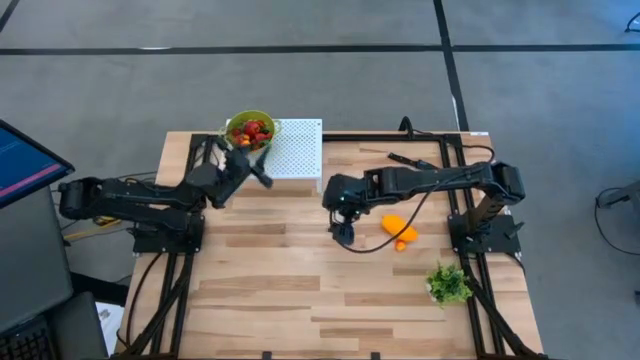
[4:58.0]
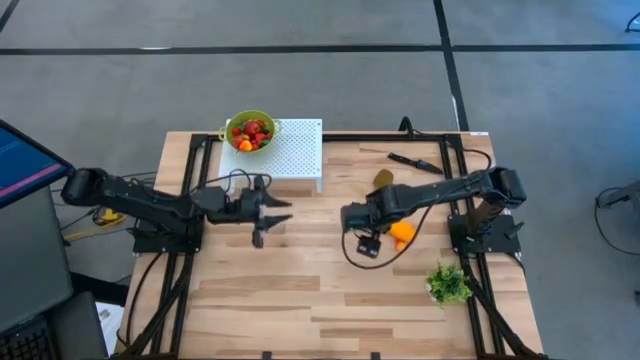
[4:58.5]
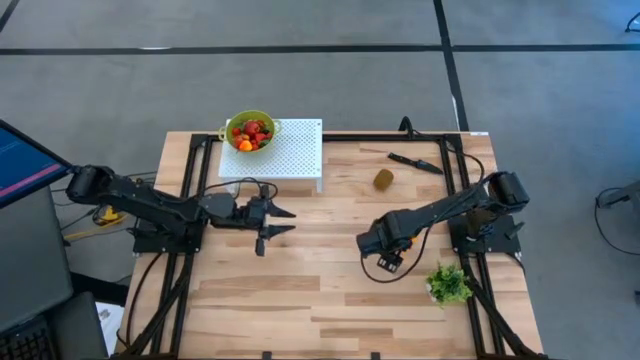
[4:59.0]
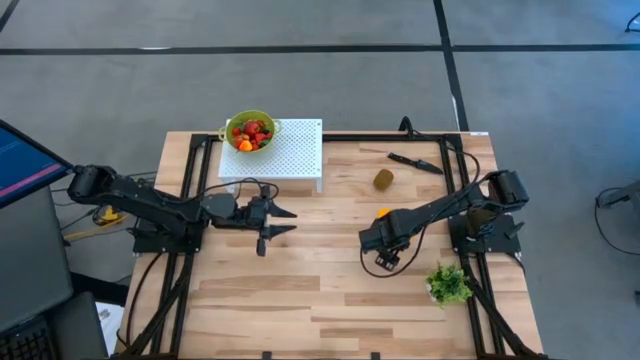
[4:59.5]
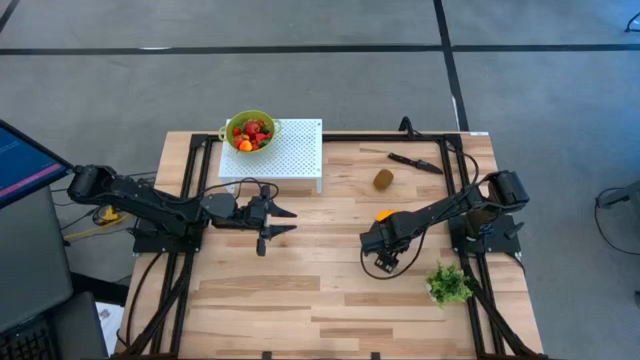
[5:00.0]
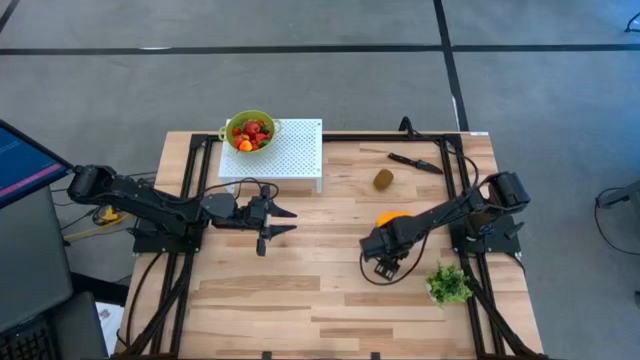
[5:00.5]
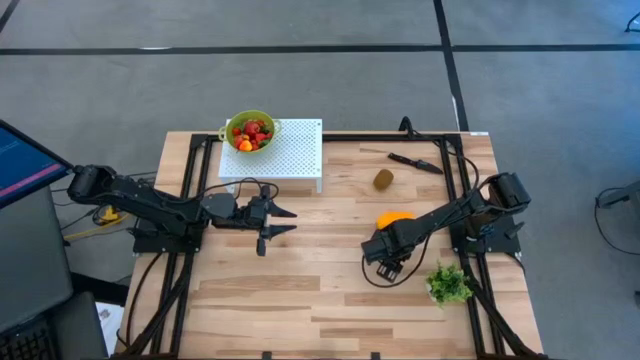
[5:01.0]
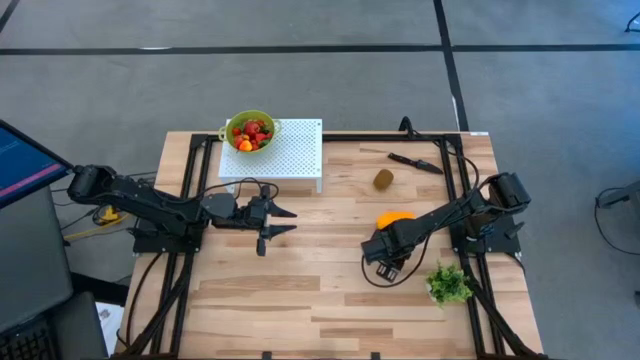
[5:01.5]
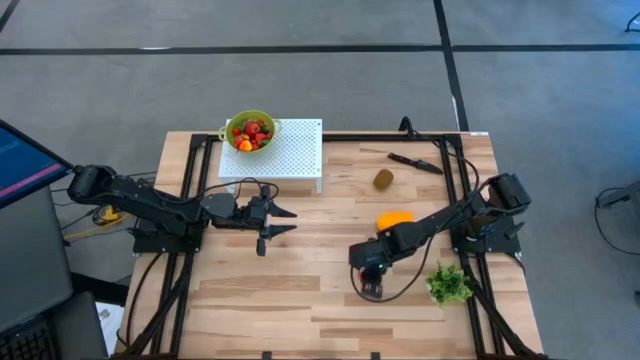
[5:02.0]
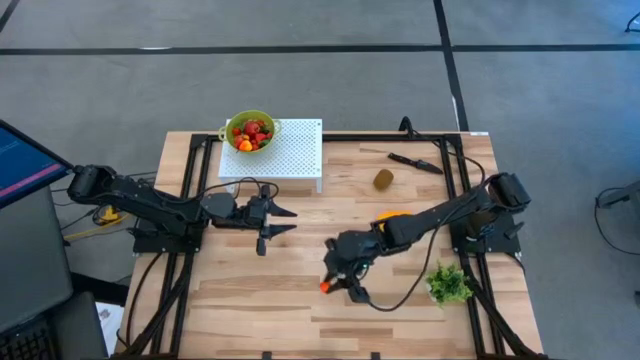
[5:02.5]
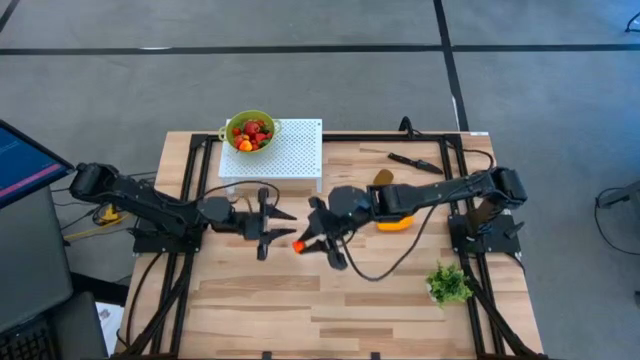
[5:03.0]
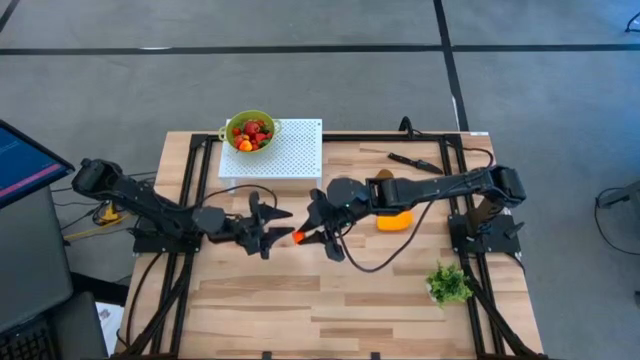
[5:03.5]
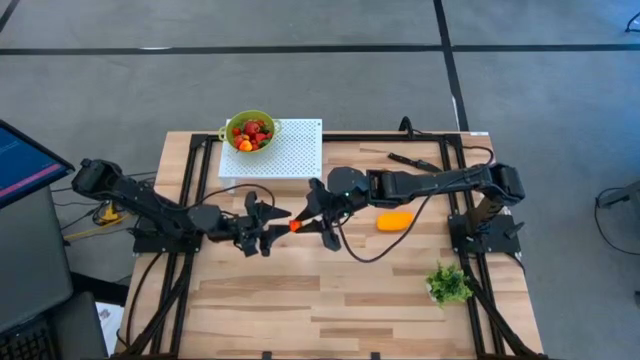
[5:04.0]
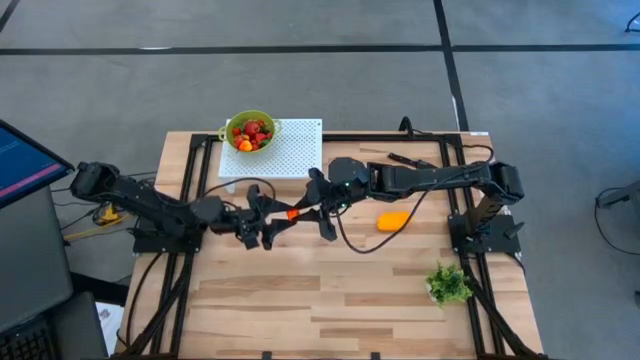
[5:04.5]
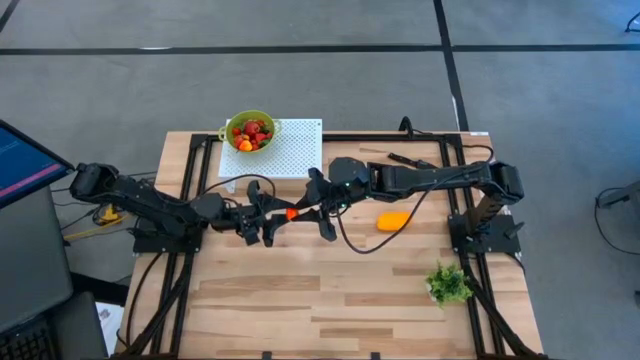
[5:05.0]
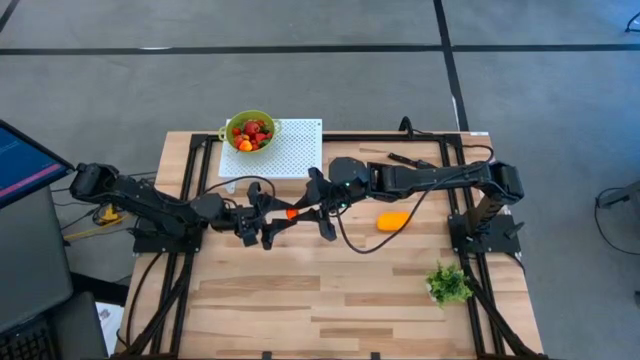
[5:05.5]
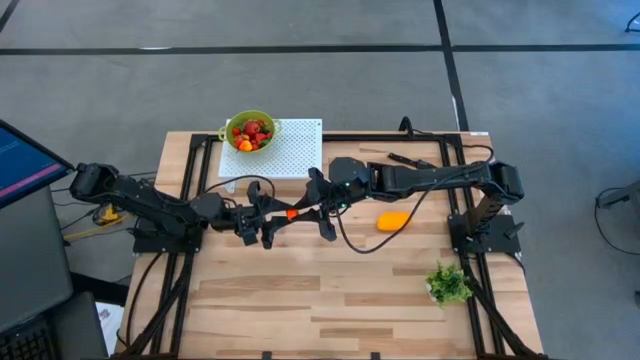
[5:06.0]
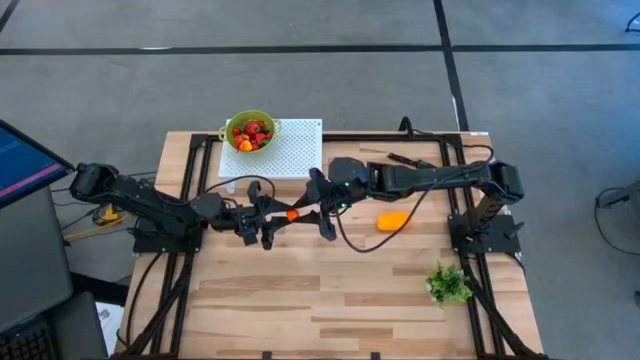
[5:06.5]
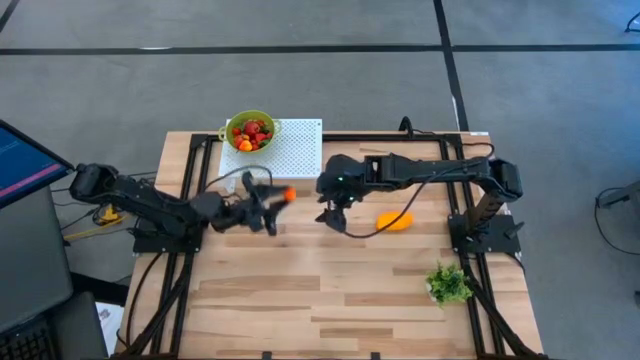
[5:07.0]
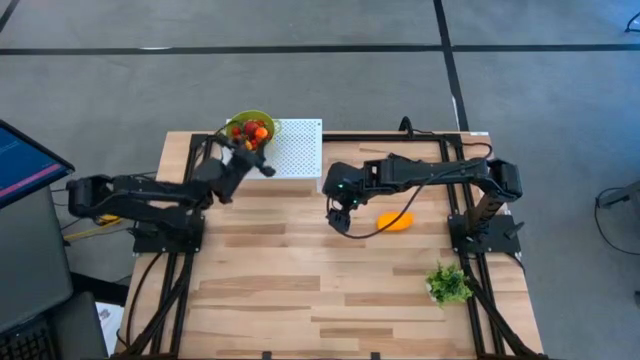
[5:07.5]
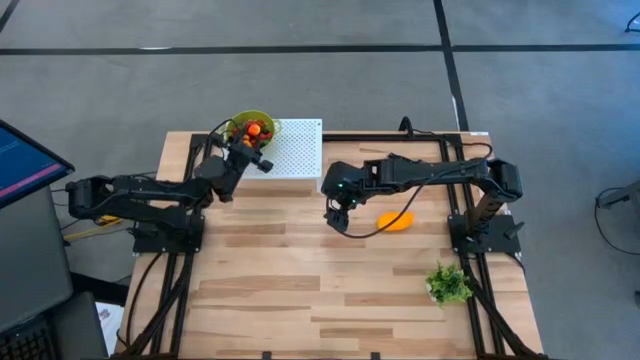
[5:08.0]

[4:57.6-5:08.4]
Task: Pick & Place Fruit
Put the peach into the green strainer bowl on the shelf

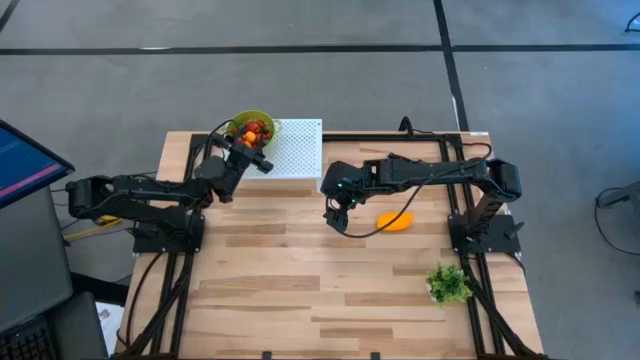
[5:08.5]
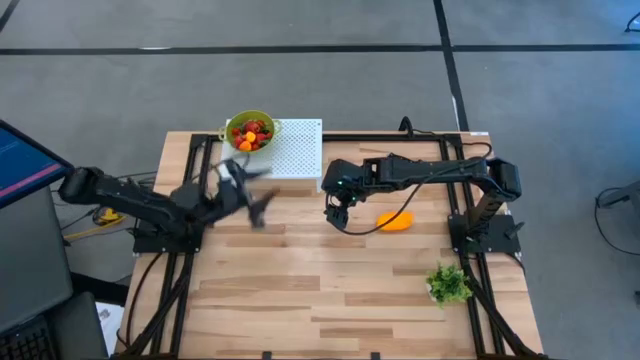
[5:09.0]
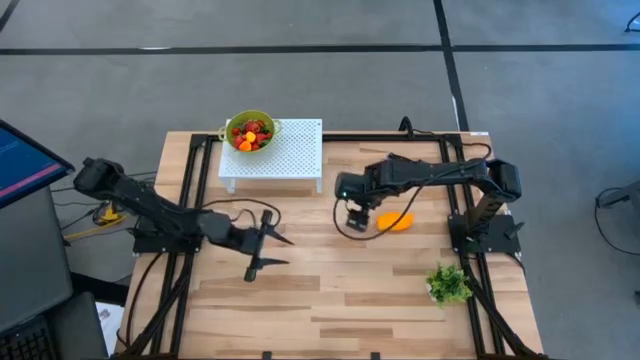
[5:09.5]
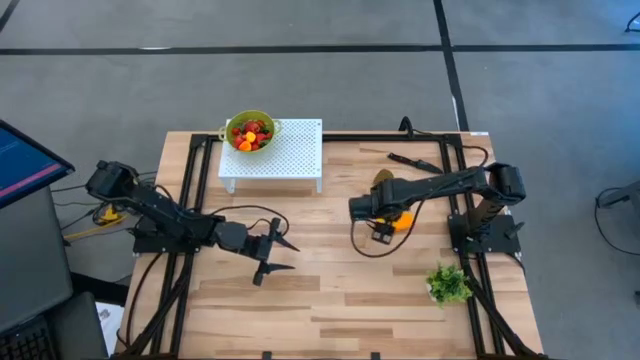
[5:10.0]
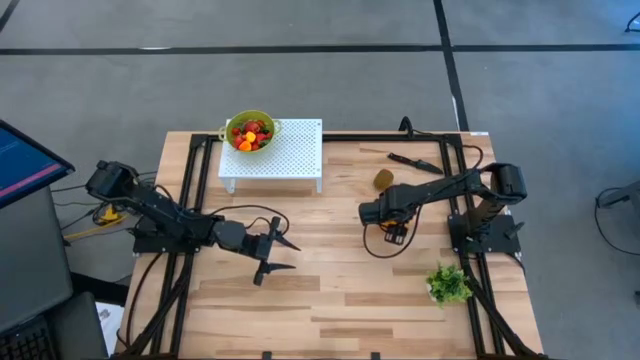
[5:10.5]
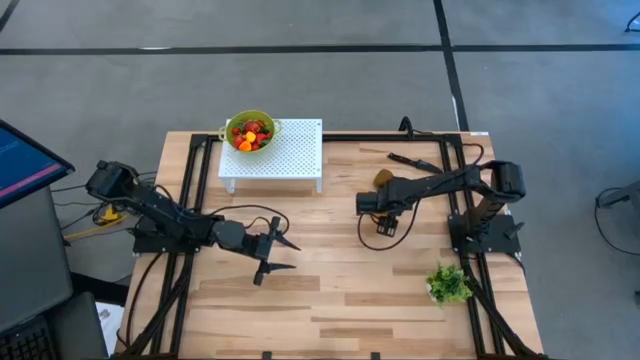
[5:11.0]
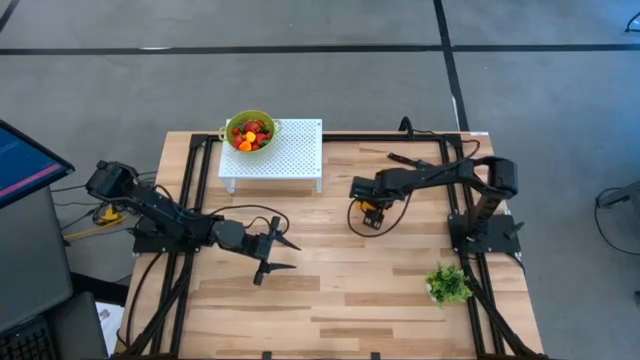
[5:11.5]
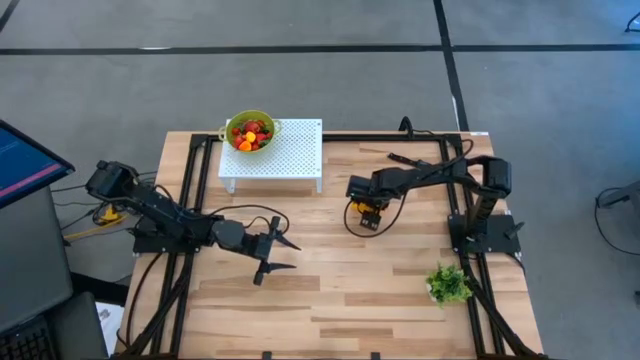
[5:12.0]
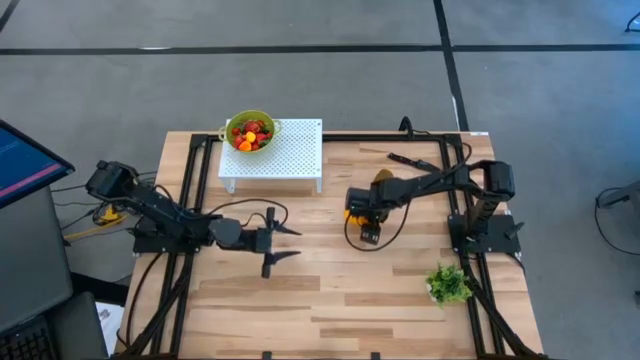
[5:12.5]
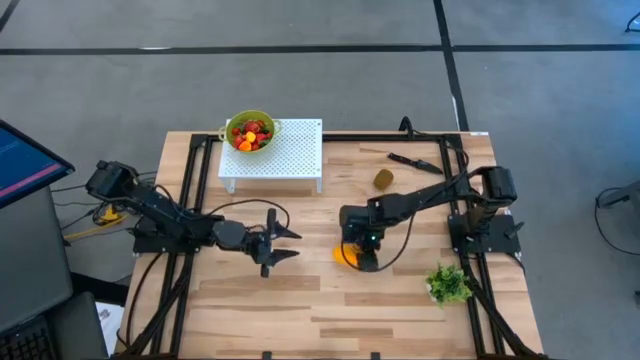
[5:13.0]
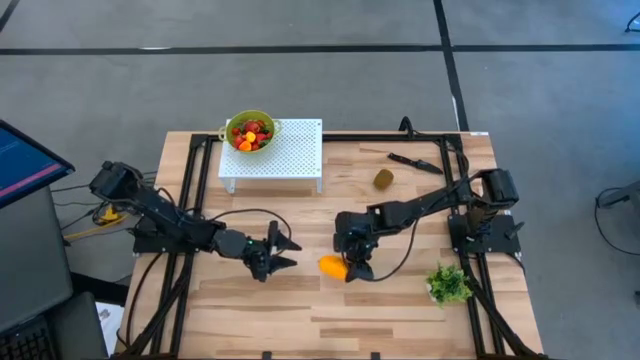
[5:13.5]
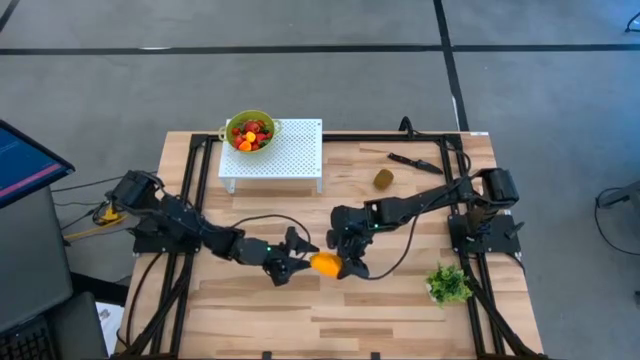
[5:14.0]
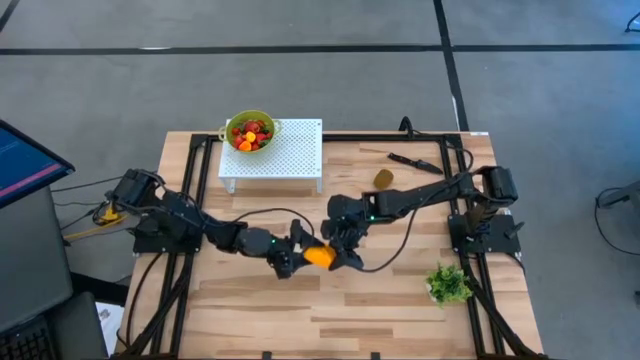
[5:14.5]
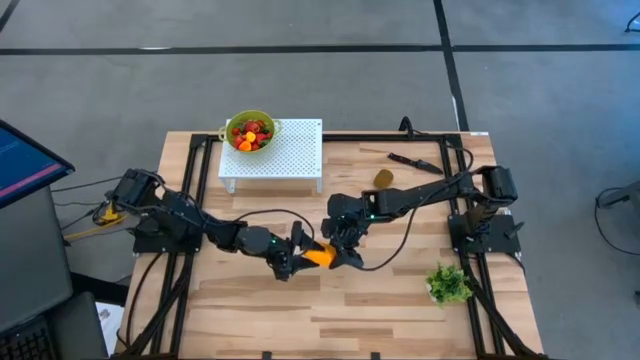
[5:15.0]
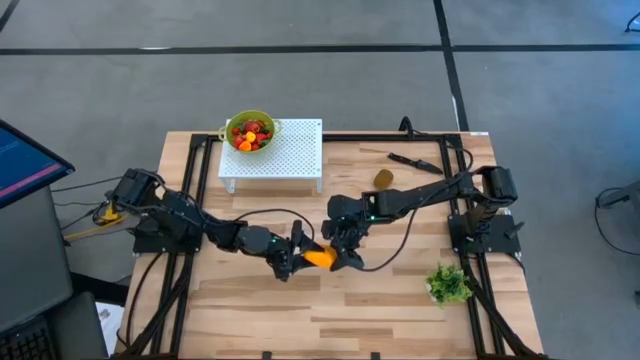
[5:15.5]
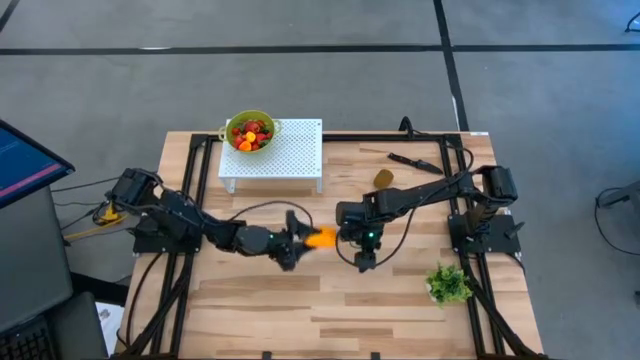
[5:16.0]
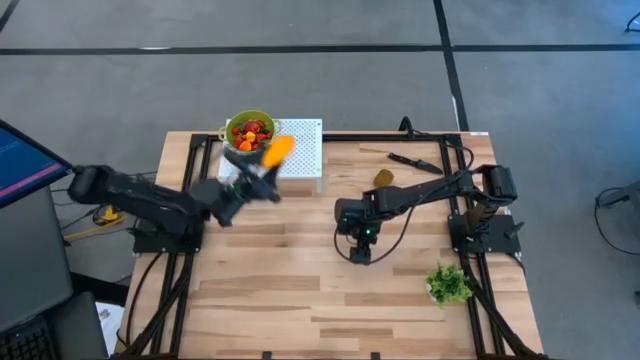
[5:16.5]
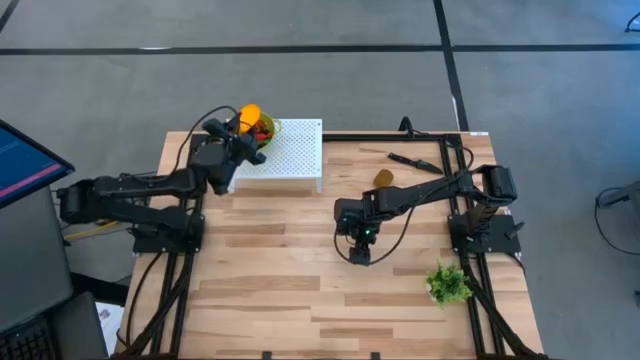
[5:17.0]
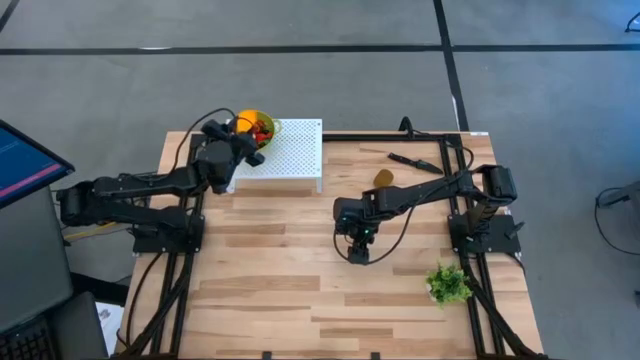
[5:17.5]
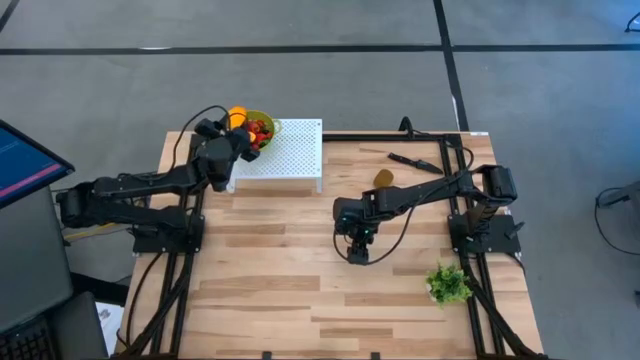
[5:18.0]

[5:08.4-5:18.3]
Put the mango into the green strainer bowl on the shelf

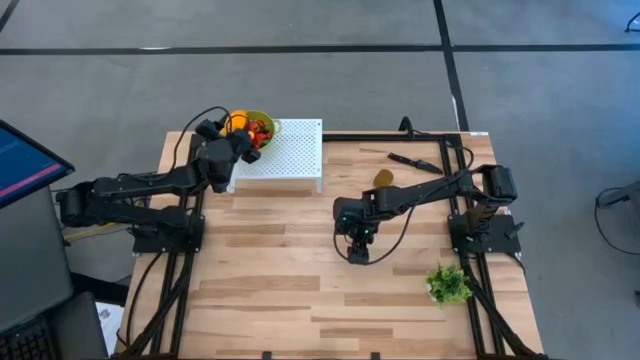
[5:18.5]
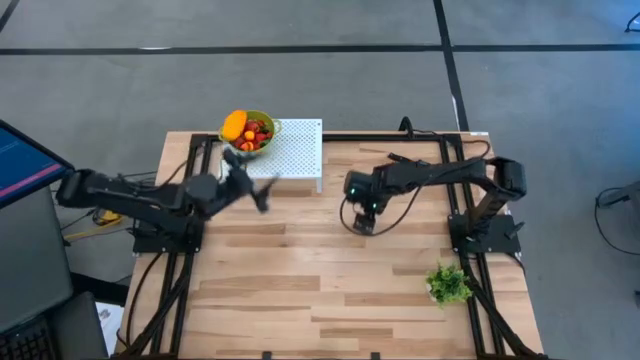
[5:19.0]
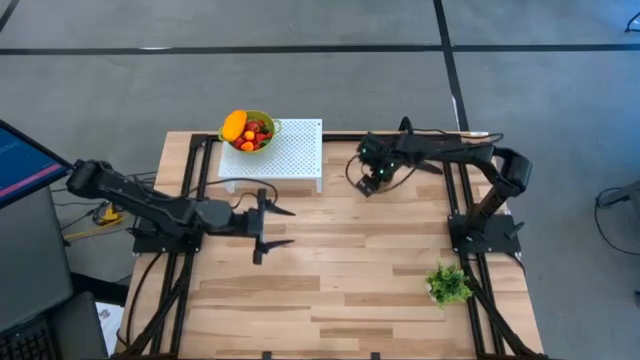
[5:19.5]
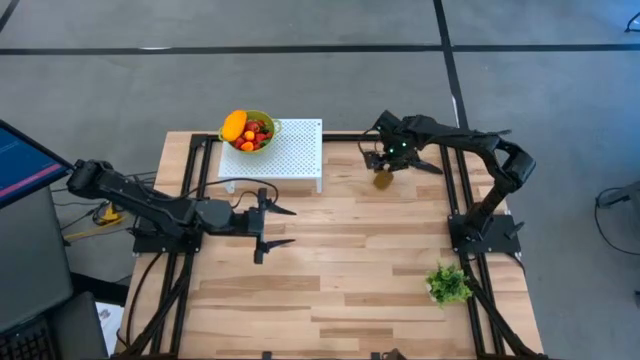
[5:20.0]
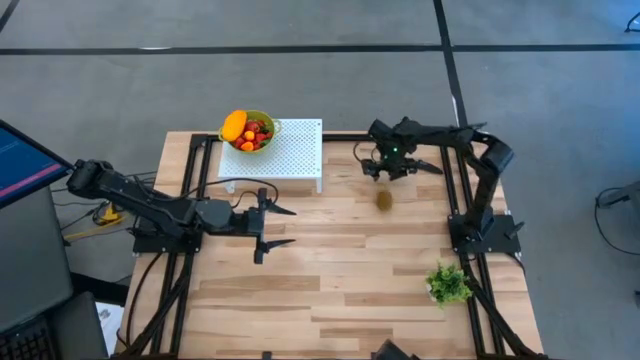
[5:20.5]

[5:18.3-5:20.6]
Put the kiwi into the green strainer bowl on the shelf
